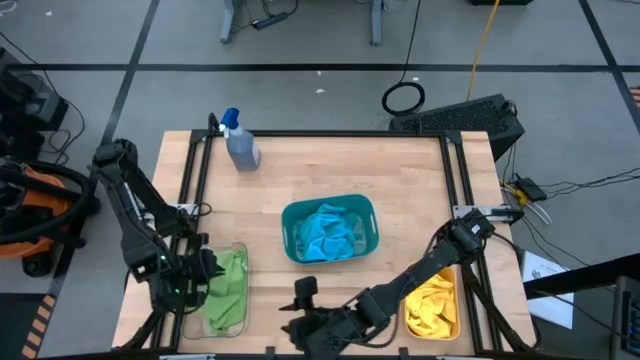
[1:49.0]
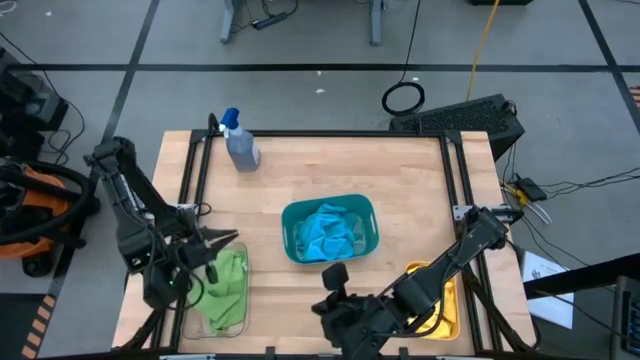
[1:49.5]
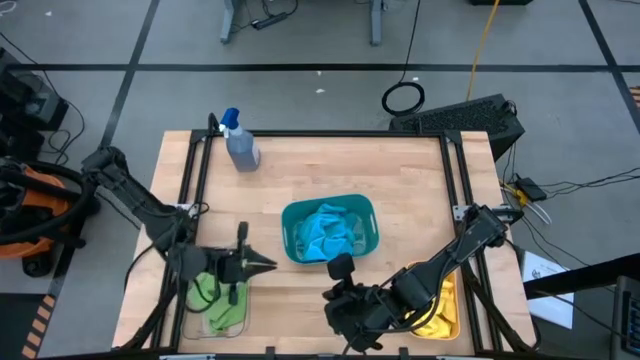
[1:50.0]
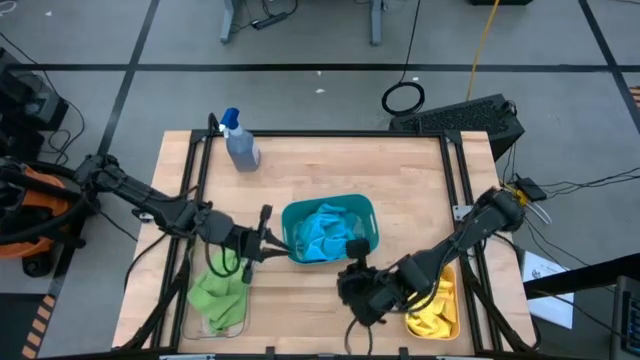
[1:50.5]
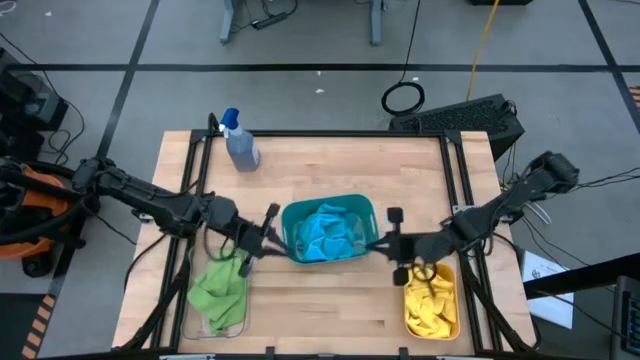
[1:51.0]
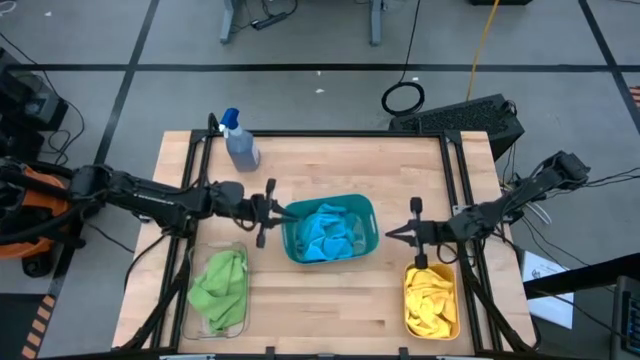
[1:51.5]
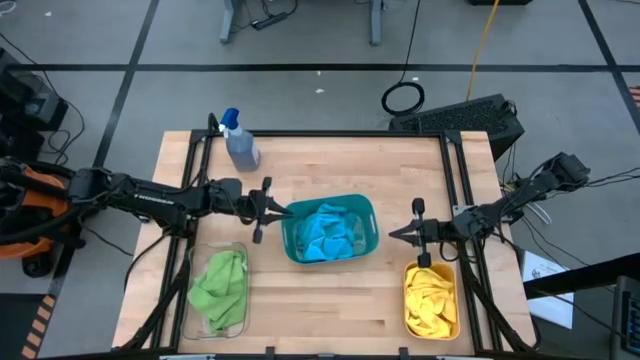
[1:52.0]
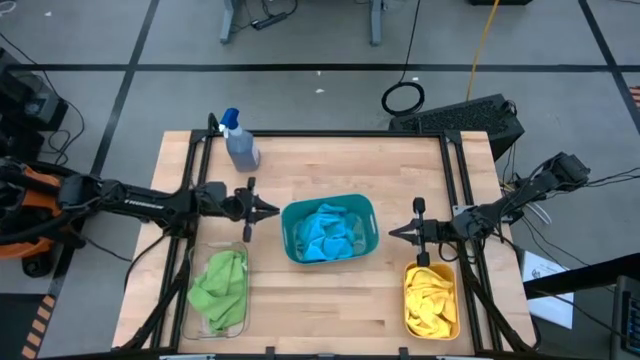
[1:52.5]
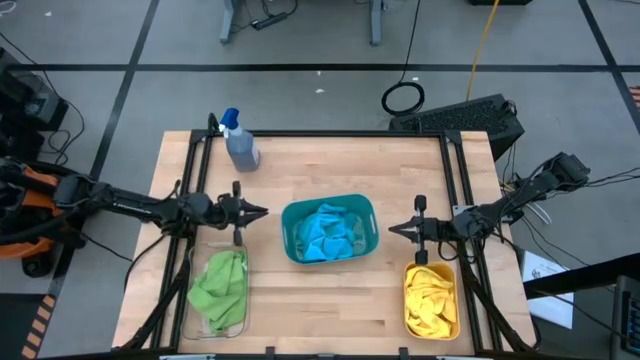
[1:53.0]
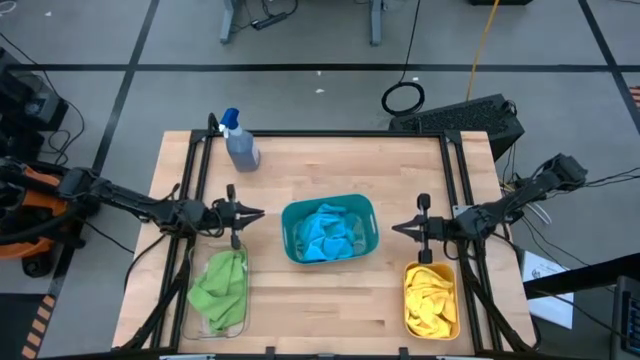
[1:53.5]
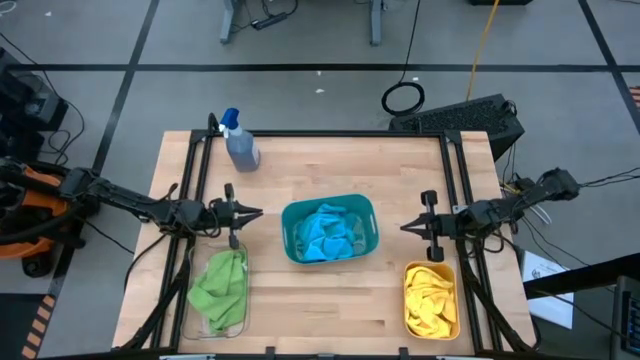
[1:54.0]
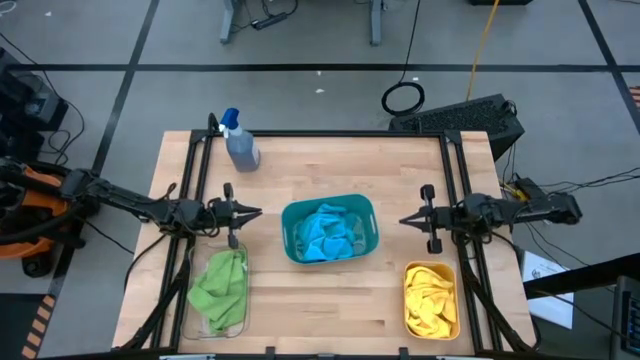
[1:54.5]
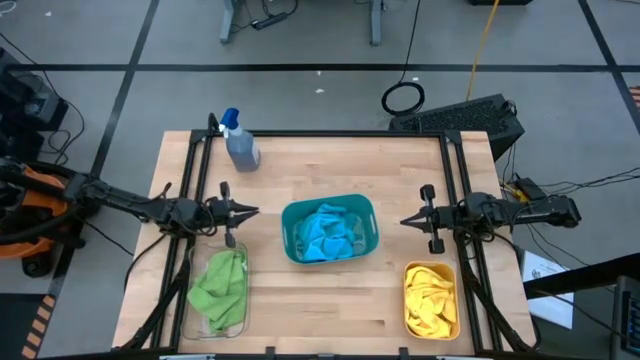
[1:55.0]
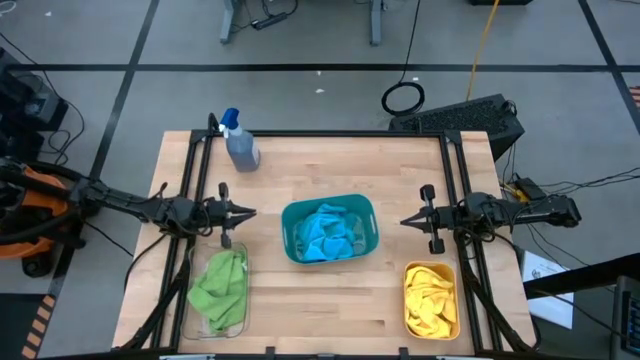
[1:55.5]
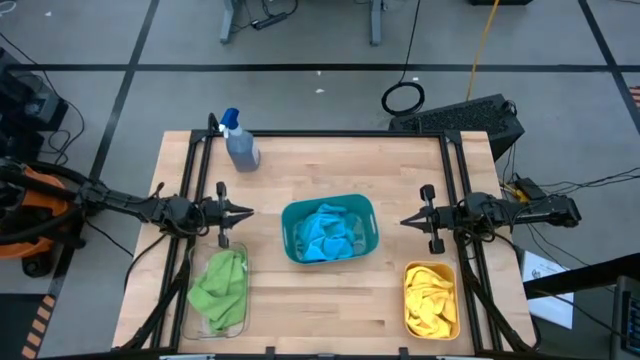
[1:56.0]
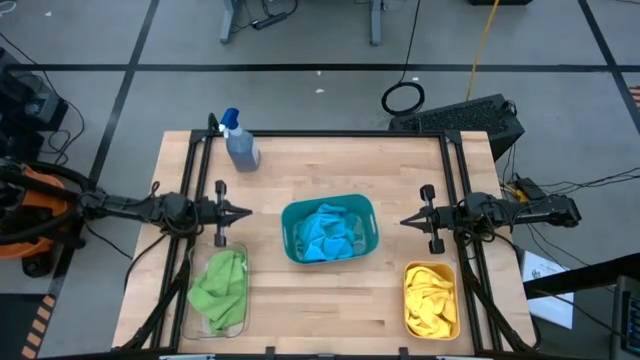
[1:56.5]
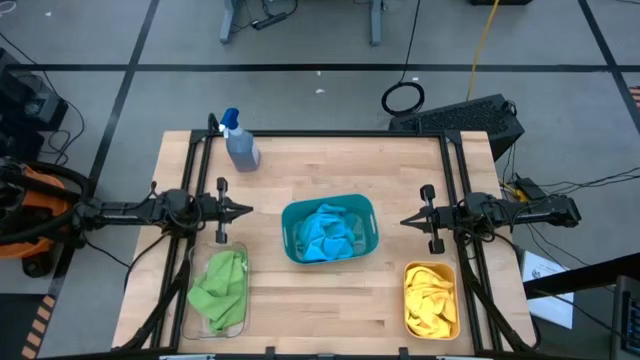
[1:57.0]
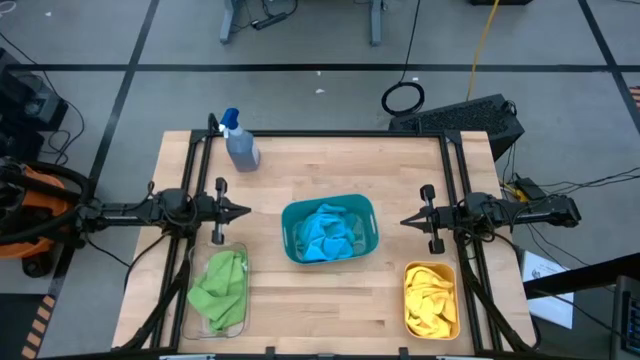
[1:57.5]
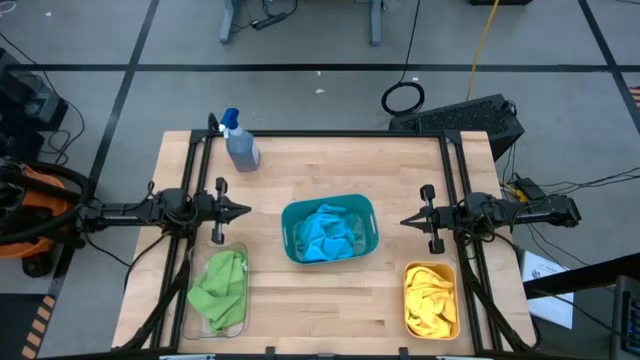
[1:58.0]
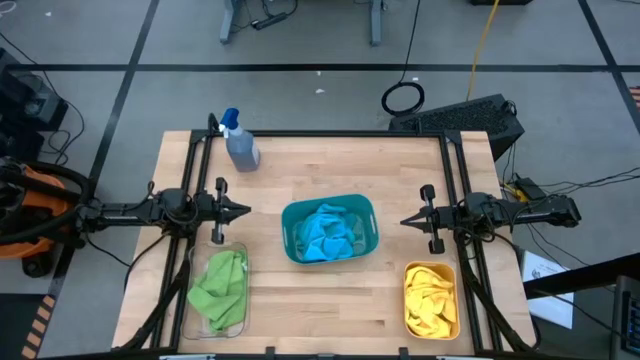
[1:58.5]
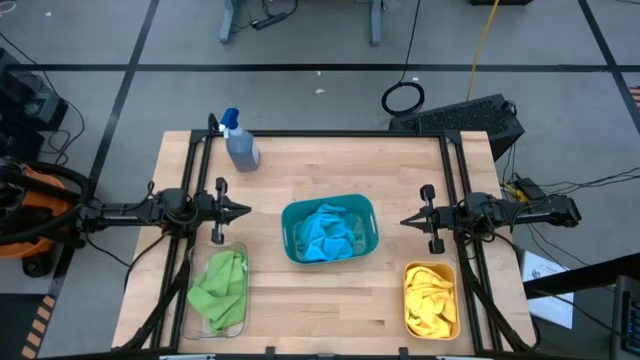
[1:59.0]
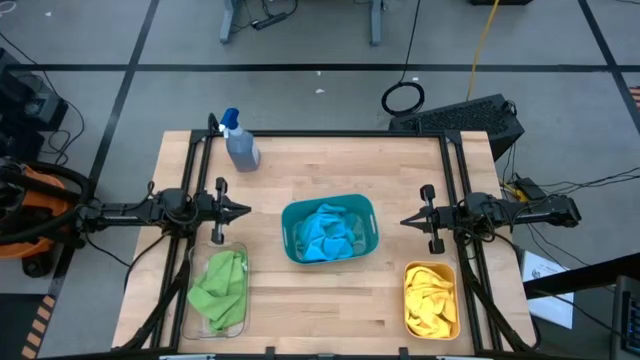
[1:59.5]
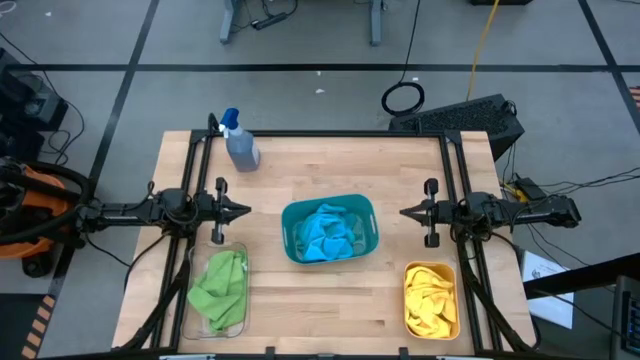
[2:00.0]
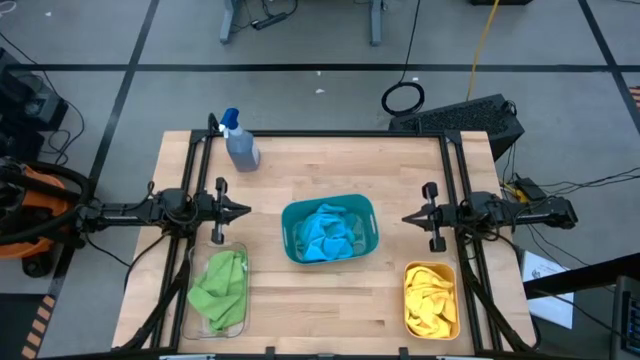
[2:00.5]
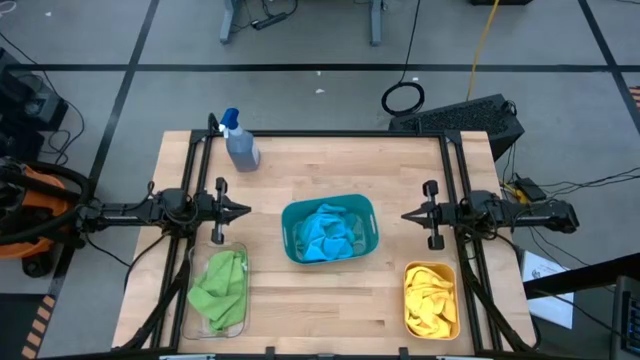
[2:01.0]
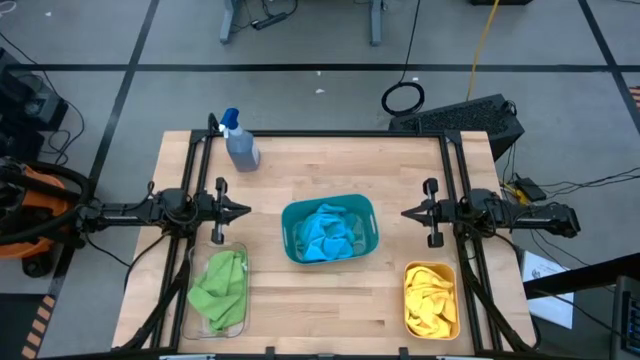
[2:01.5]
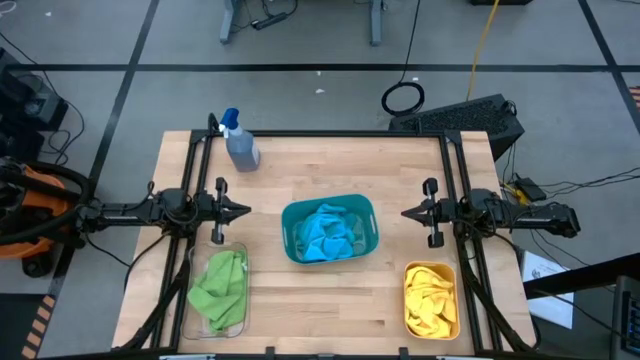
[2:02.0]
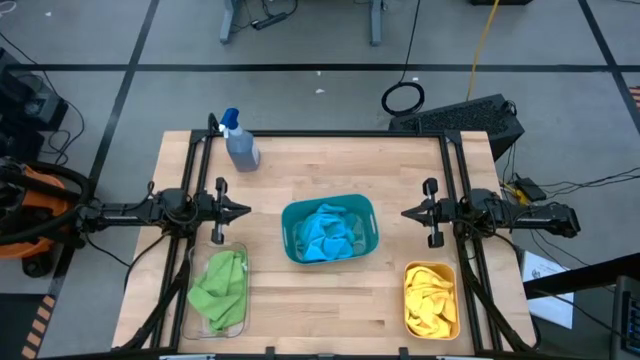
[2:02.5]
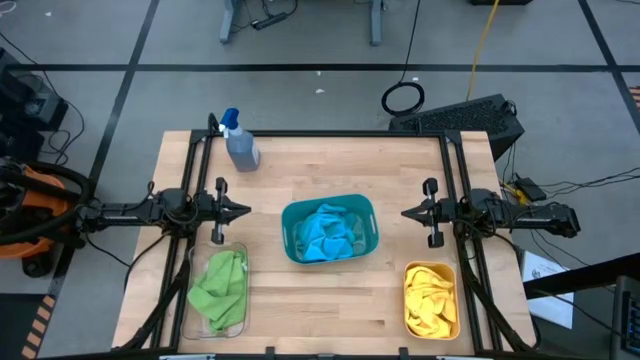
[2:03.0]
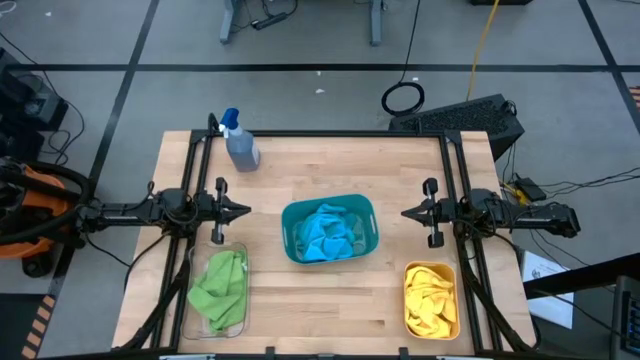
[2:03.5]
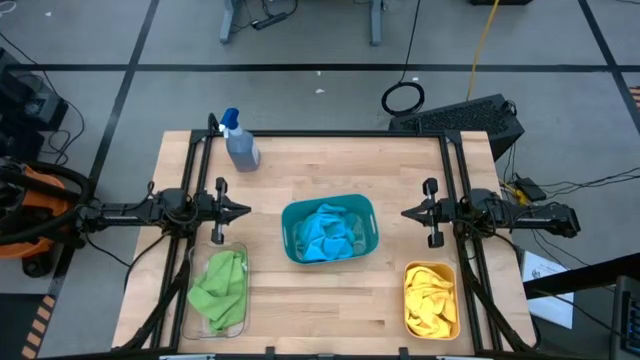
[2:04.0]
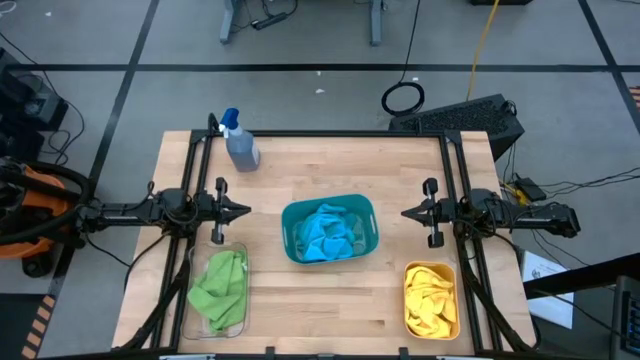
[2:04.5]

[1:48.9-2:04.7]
Task: Sort microfiber towel by color & place in baskets
Return to Home Position

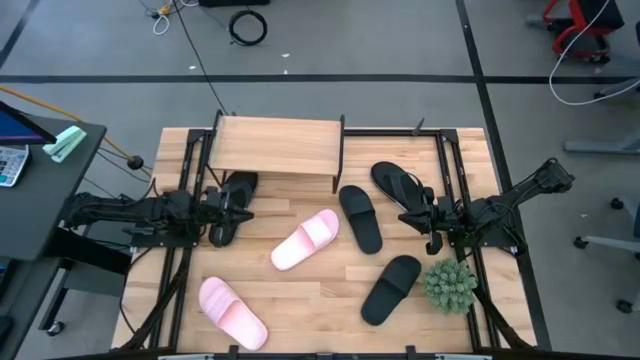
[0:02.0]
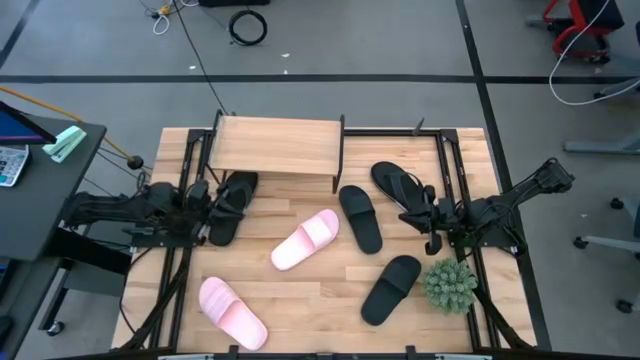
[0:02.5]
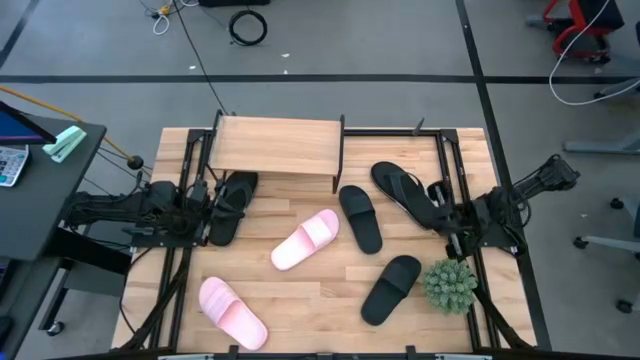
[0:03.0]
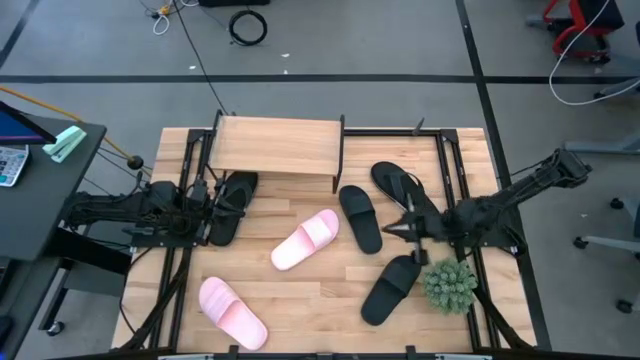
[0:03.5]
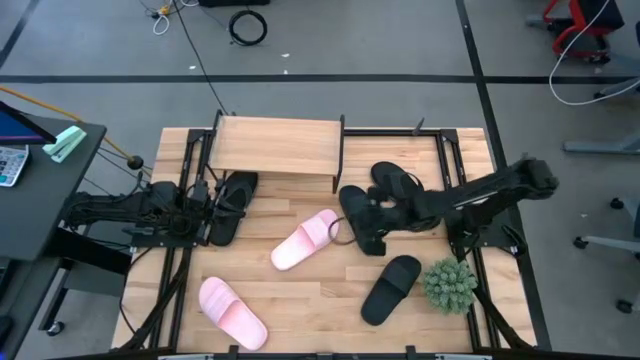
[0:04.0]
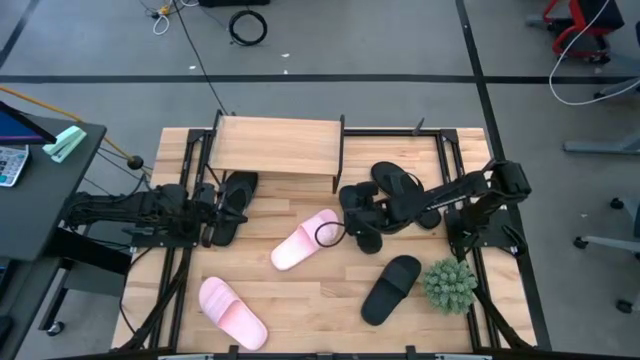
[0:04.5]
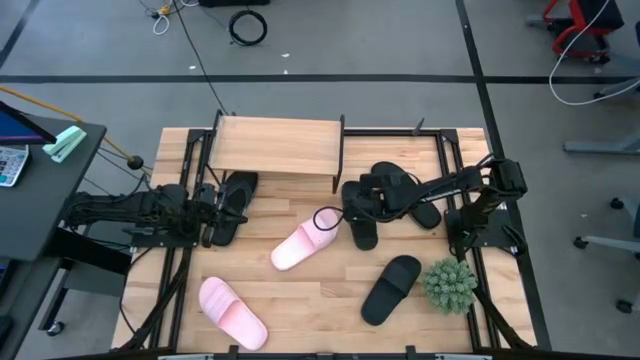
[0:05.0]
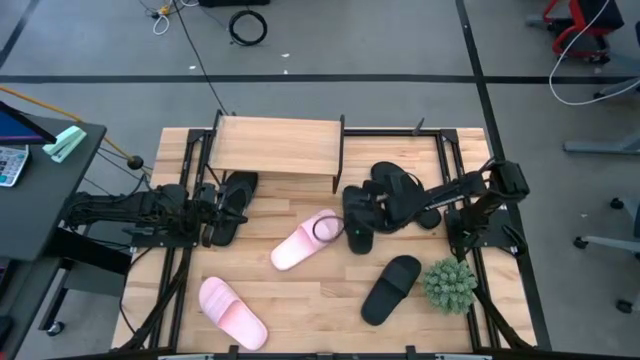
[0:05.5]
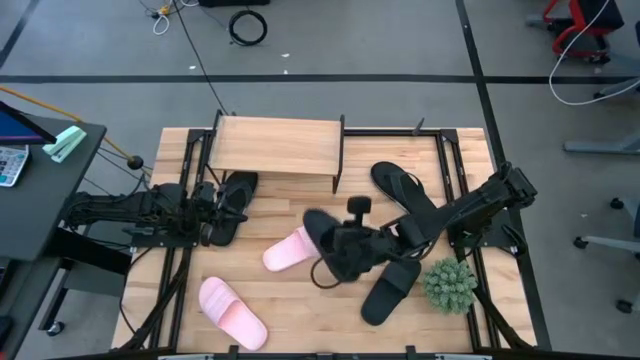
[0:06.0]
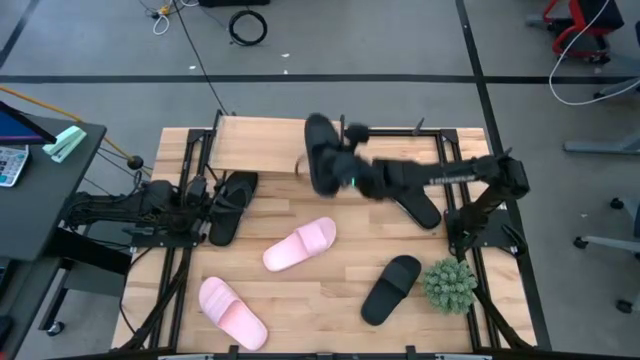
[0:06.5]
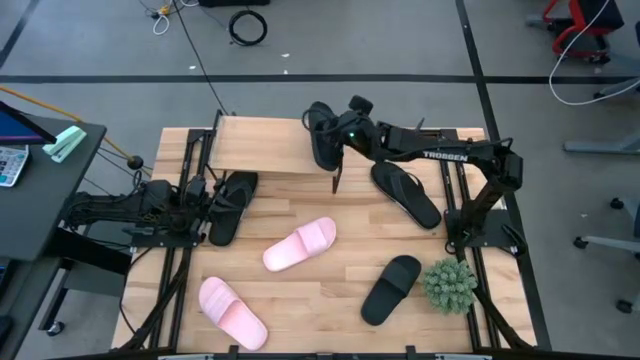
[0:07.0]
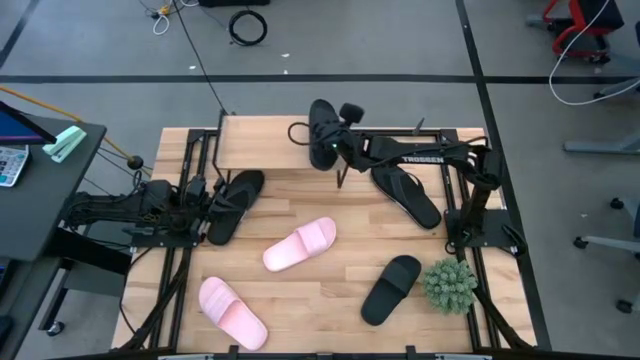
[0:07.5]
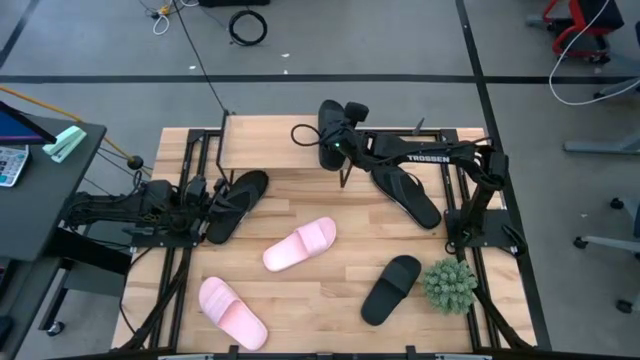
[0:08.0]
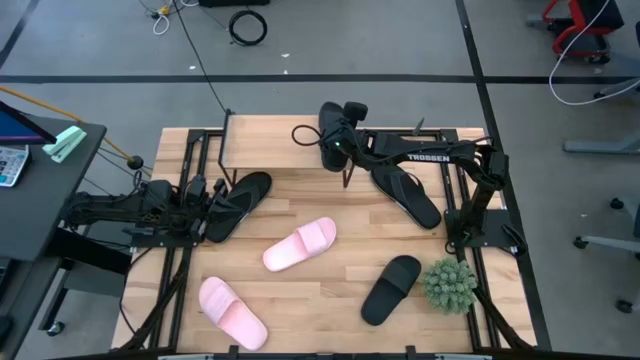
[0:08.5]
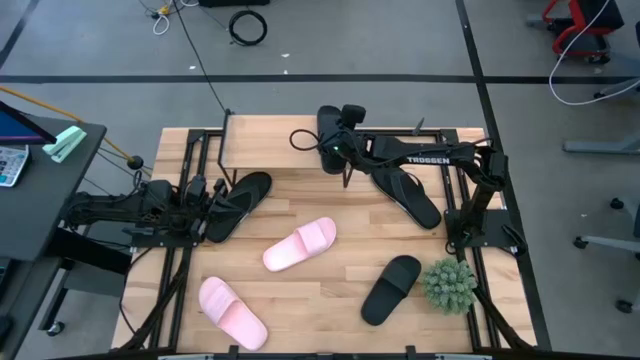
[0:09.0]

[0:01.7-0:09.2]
Task: Pick and place slides into the shelf
Put the black slipper on the shelf
